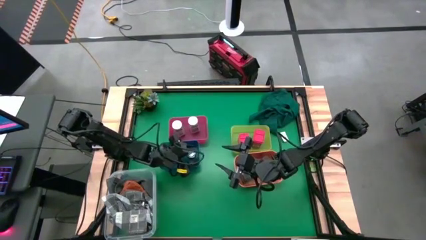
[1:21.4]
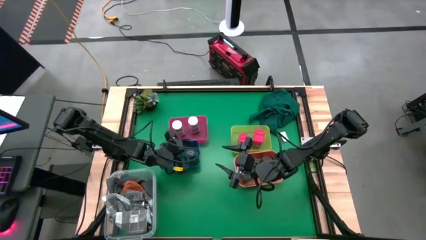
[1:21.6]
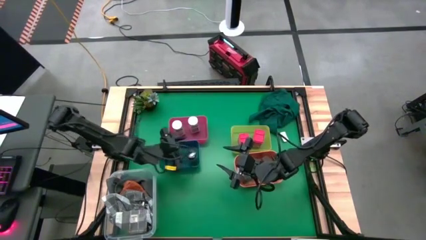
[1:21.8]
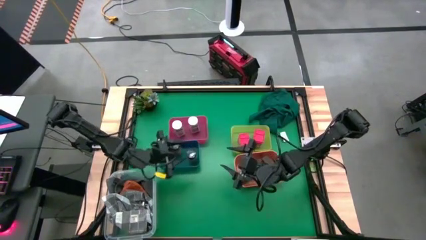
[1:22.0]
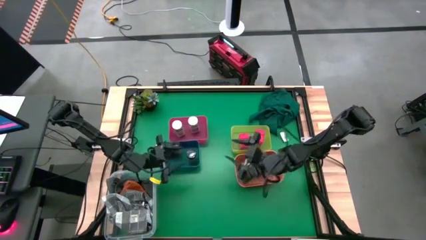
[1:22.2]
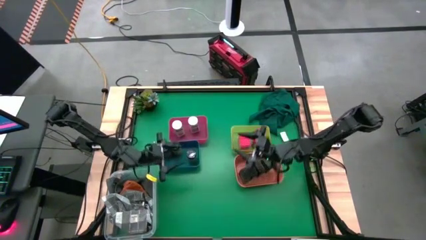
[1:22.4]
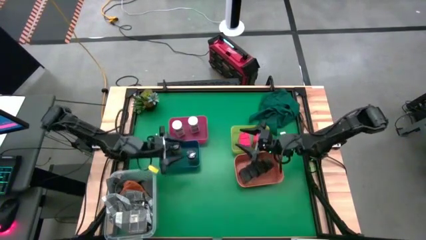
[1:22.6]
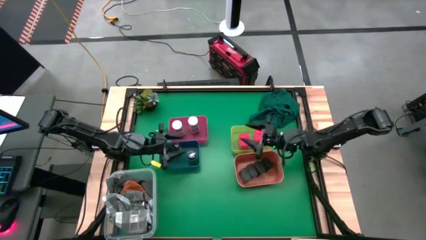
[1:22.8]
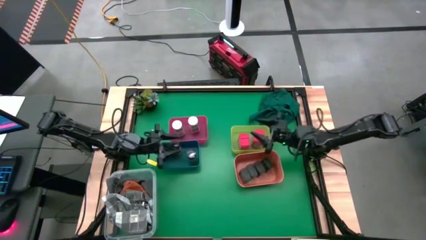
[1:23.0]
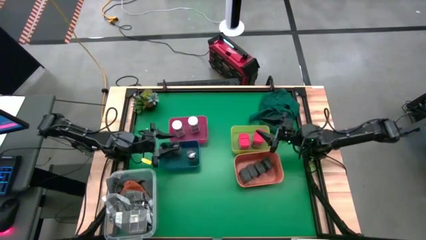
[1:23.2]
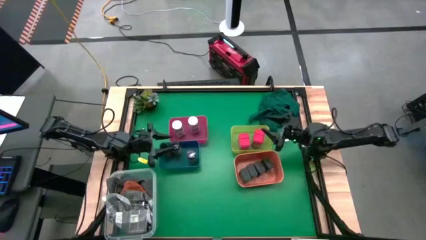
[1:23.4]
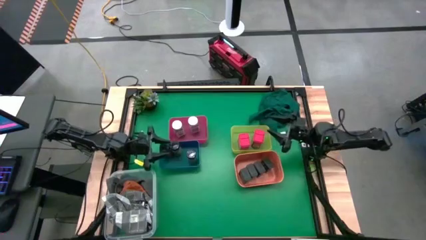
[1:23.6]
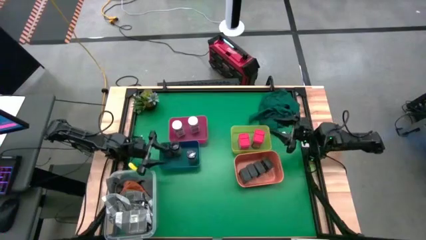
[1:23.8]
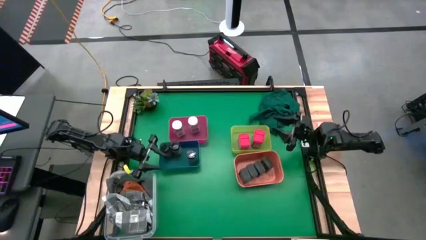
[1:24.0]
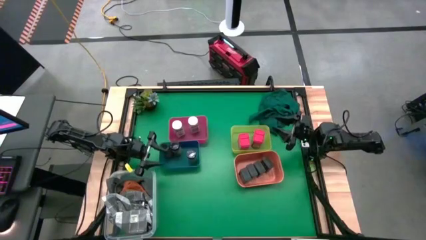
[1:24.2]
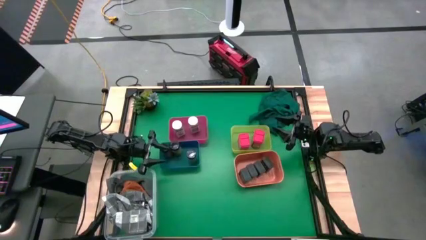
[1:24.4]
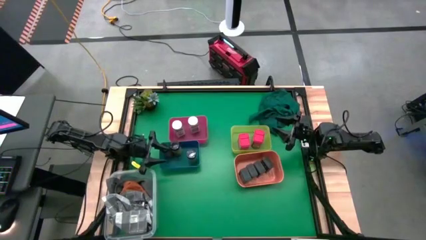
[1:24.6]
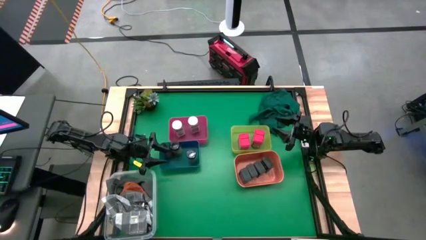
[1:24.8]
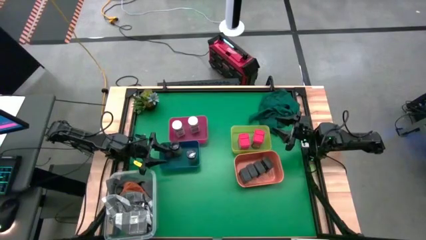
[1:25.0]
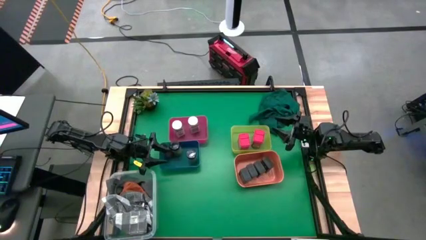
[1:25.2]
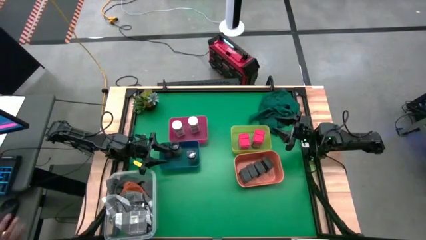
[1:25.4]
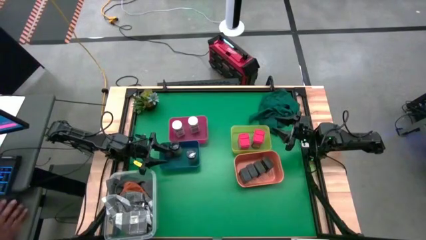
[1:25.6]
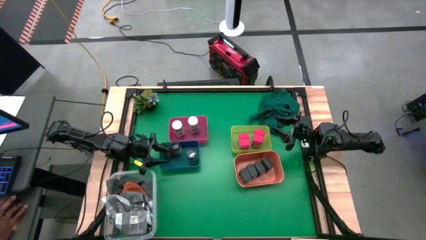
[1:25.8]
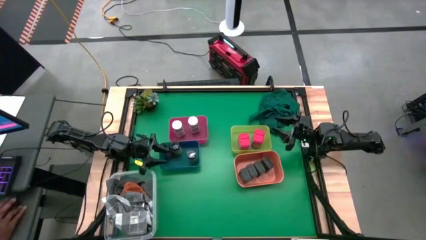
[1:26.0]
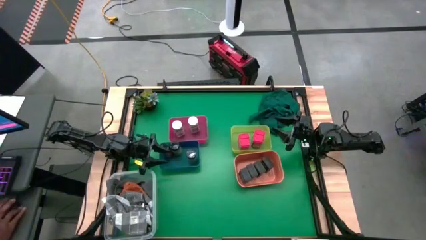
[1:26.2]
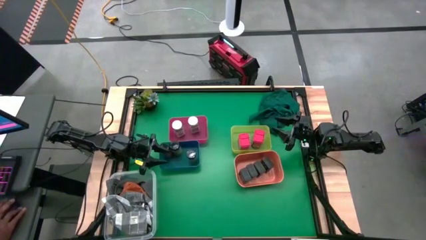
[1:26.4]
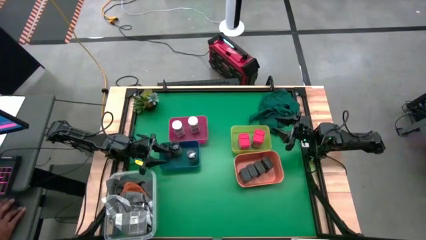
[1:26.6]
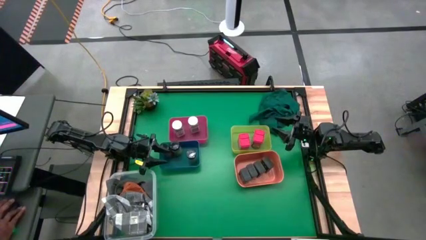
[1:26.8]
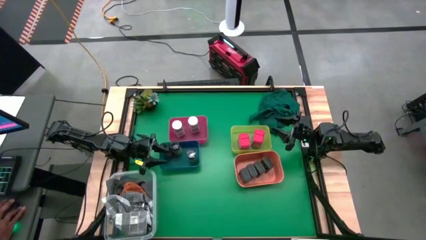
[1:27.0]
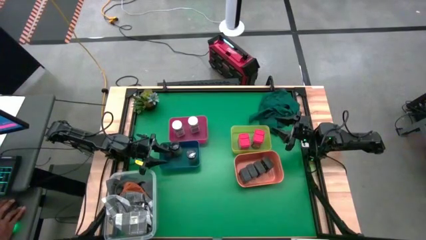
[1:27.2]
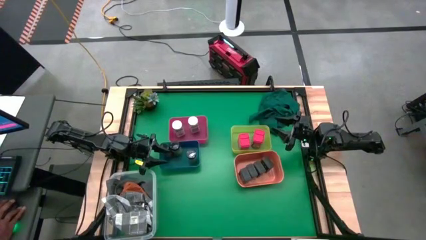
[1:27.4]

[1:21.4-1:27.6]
Task: Sort spices by type
Return to Home Position

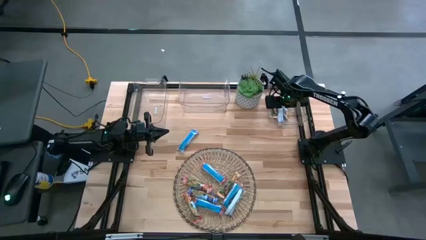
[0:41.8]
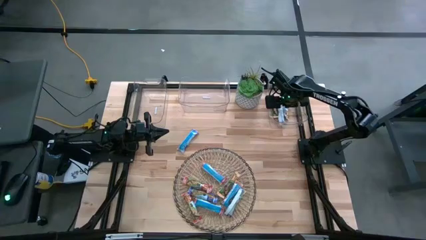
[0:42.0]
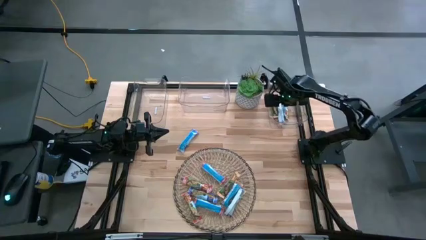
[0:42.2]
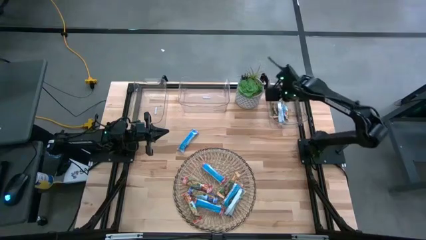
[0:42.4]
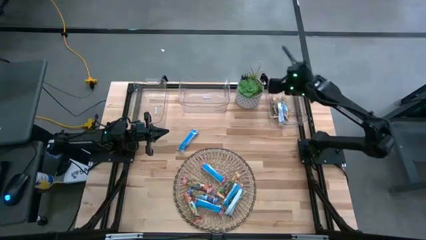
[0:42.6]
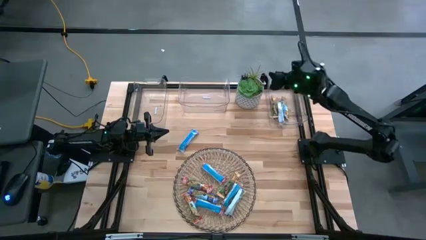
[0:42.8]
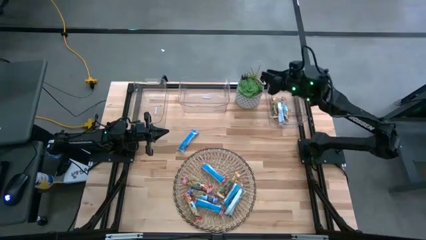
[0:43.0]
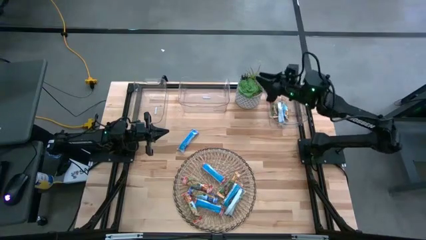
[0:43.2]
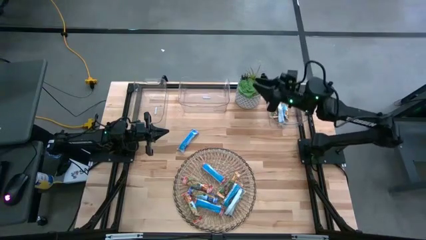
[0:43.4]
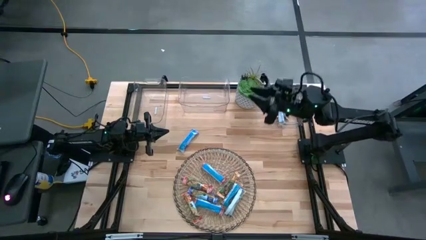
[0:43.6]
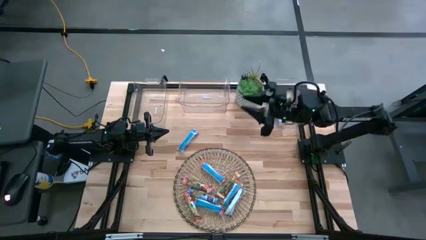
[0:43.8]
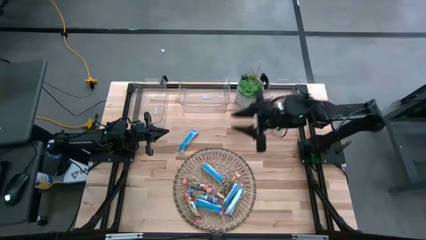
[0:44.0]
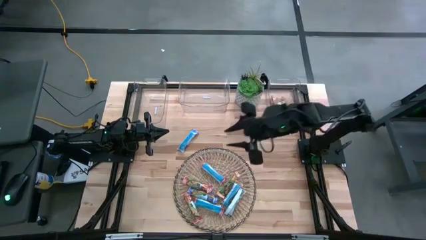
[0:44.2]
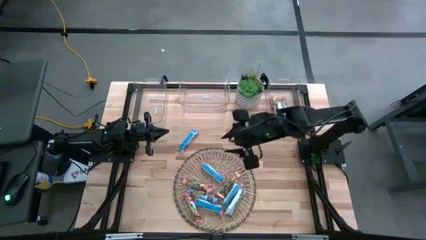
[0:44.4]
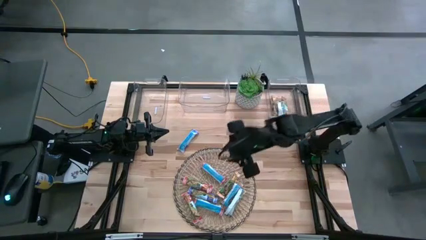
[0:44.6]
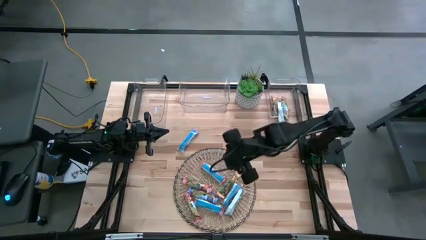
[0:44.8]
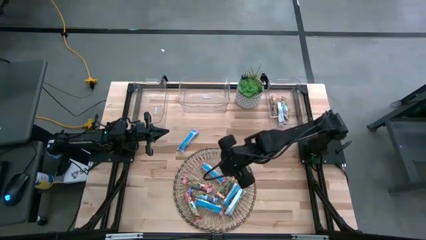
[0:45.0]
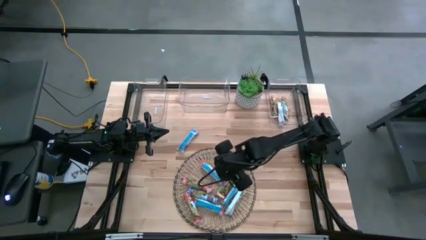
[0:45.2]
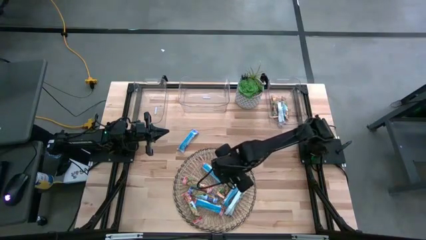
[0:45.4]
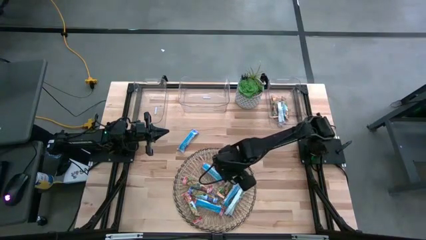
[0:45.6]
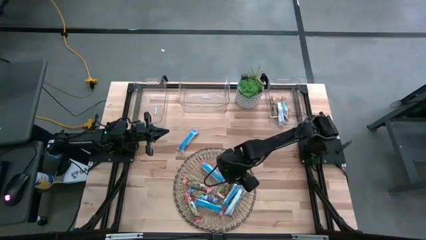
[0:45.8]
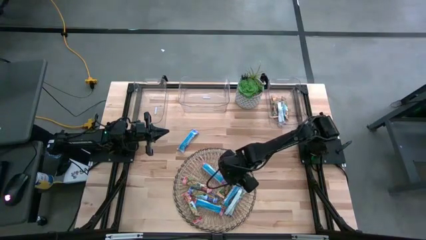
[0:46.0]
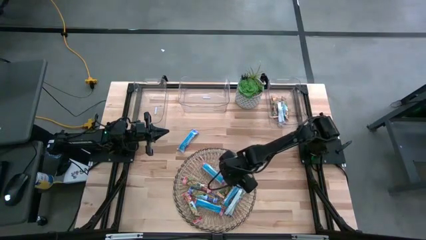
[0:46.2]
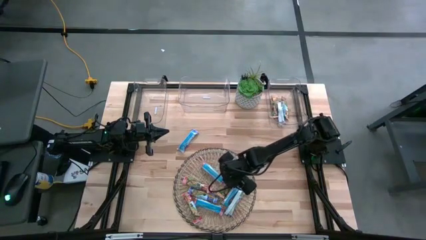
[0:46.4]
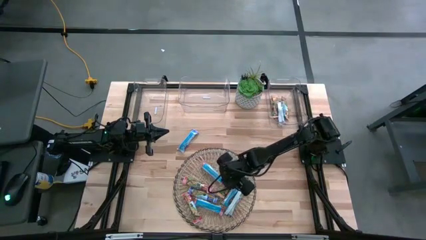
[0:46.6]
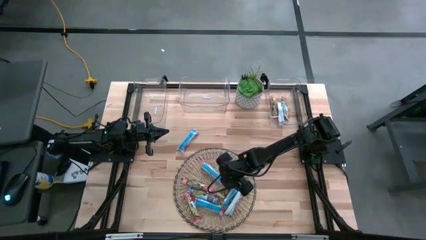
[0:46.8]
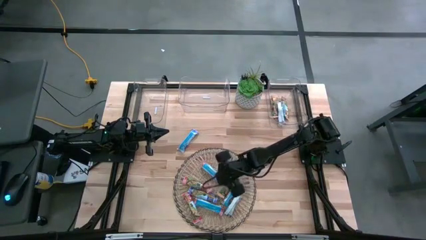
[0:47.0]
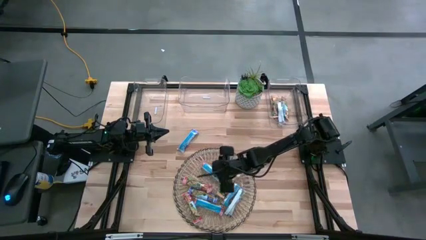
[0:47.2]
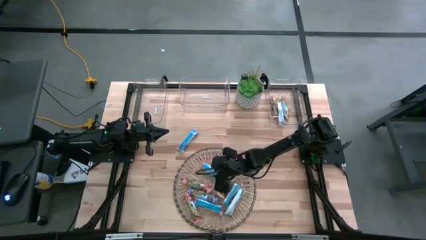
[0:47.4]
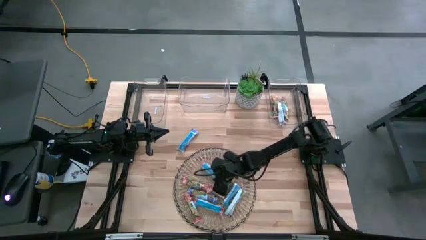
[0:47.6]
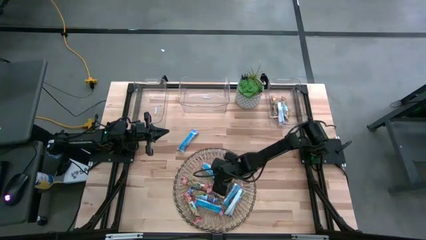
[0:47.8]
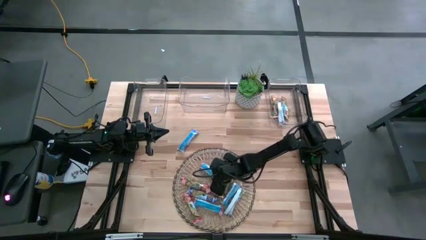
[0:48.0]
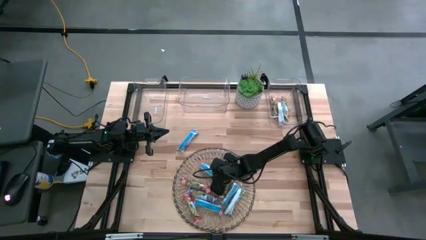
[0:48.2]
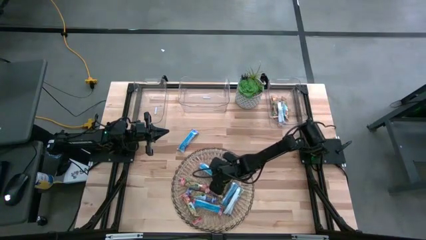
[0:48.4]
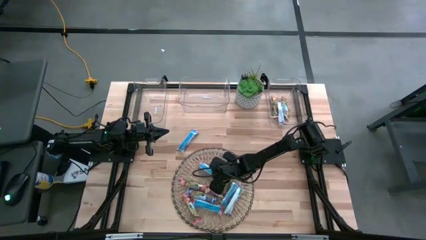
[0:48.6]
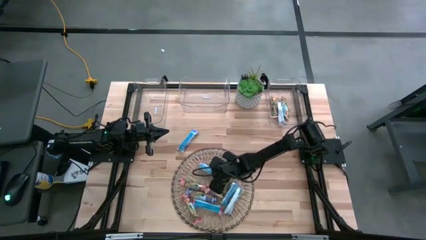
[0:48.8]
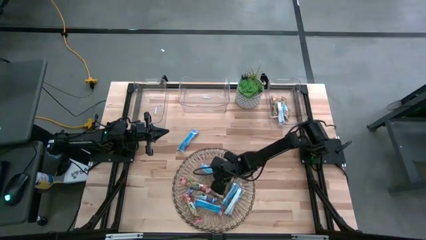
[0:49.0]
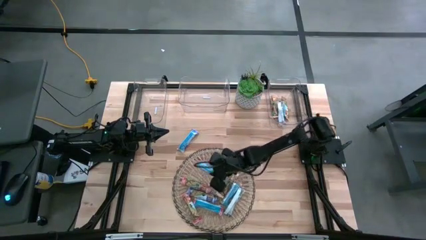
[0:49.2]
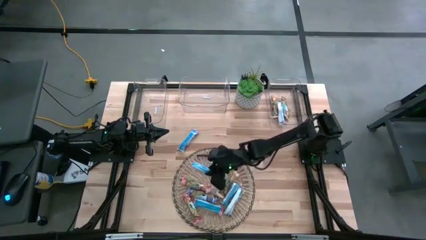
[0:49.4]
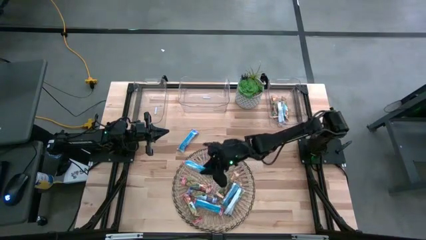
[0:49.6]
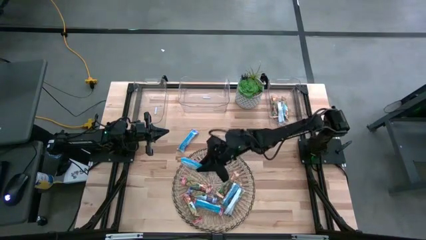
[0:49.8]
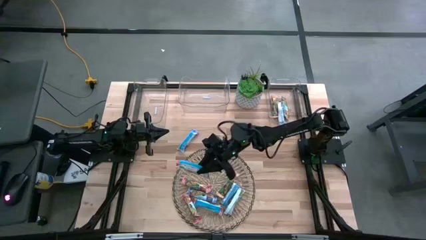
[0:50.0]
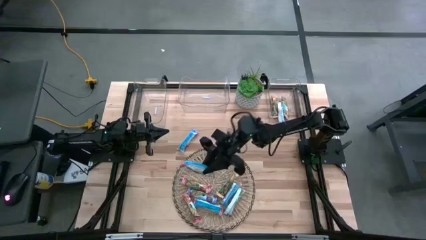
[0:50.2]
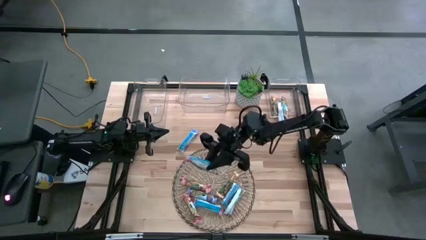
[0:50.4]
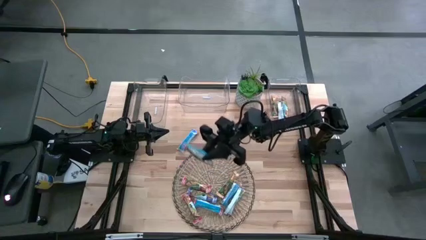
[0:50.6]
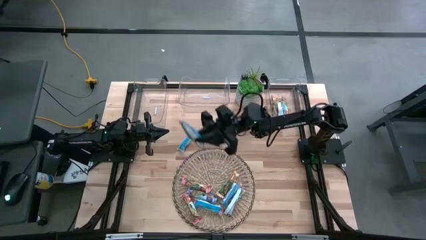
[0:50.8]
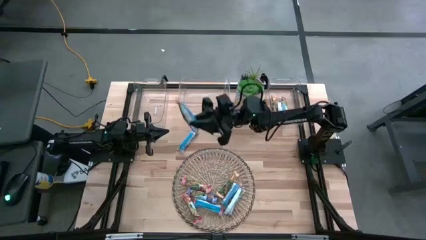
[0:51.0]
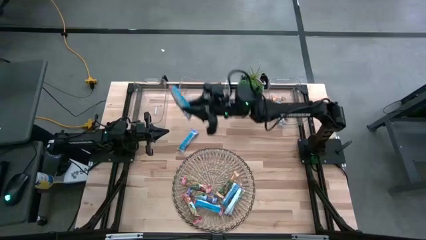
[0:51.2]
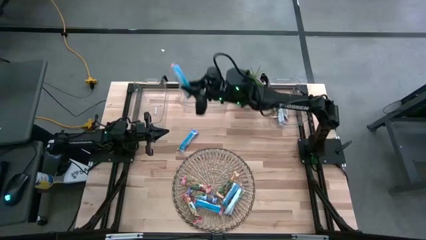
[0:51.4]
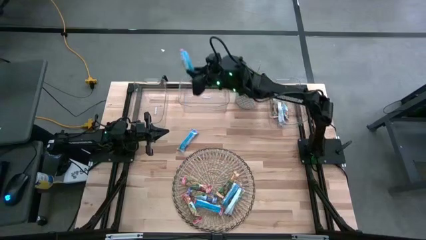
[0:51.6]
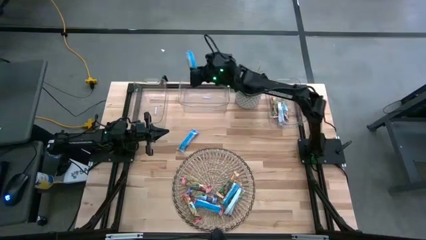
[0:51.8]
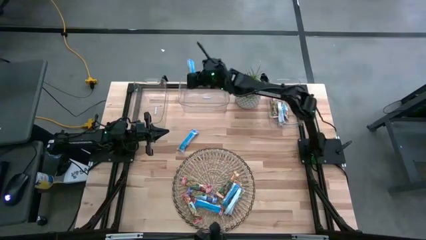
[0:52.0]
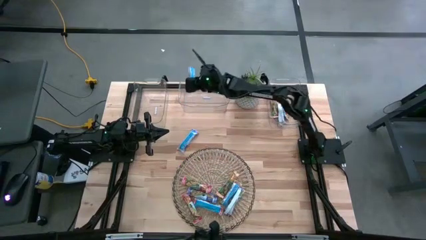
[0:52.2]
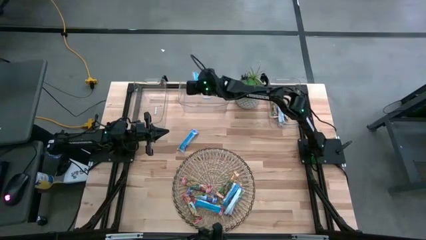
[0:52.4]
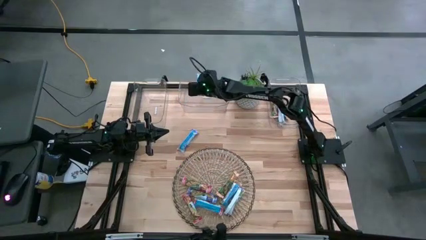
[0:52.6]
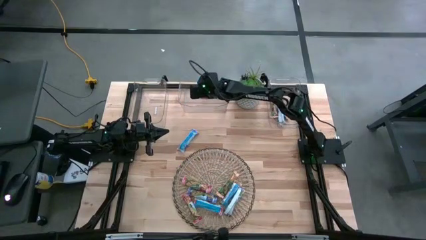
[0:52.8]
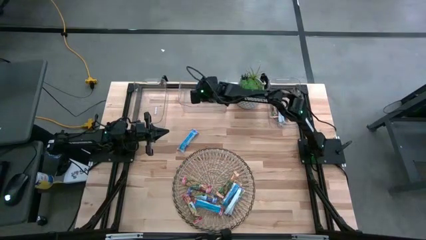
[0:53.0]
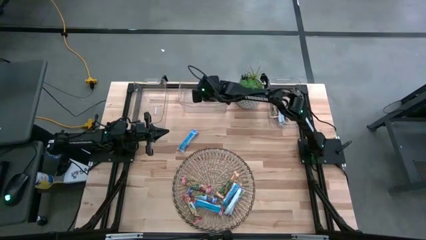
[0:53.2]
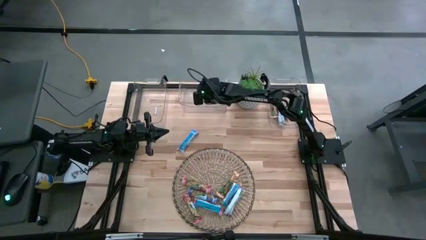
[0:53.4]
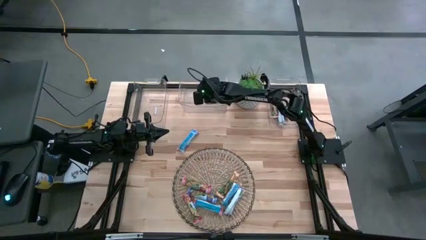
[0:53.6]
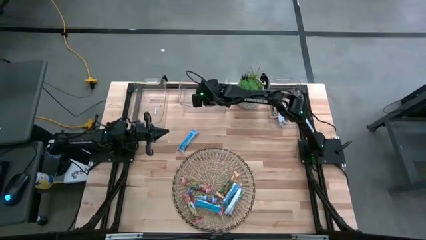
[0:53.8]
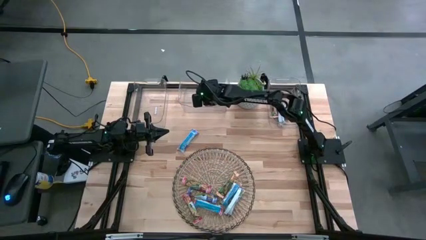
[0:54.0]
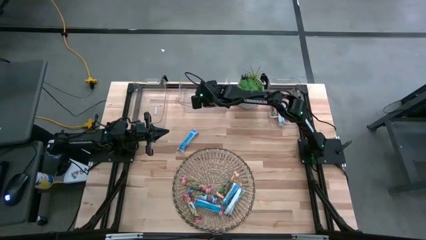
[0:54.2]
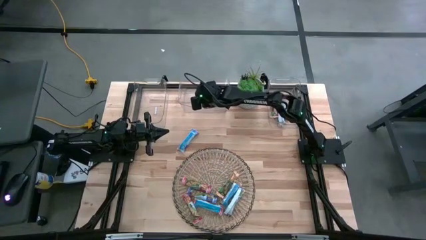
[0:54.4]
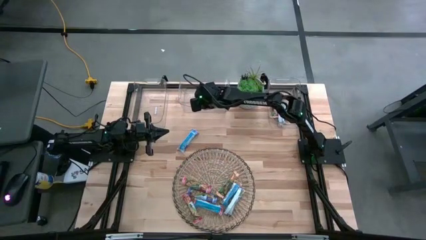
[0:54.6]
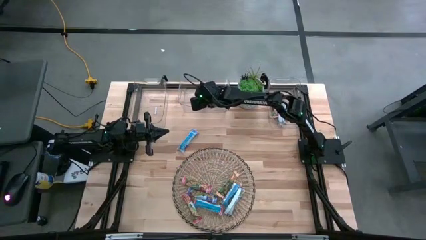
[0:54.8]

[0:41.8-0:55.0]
Task: Pick and place Granola Bars by type
Put the red granola bar into the middle transparent bin
